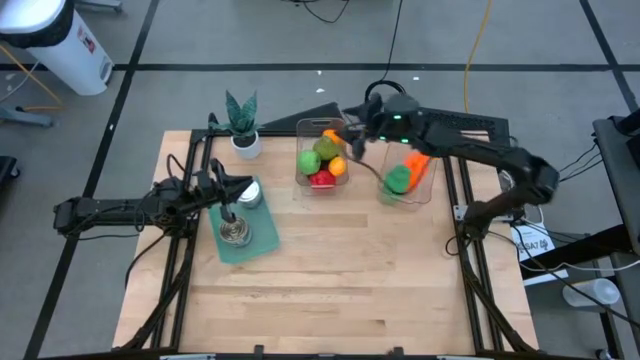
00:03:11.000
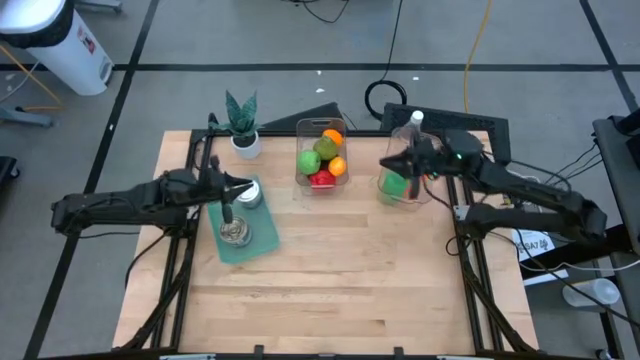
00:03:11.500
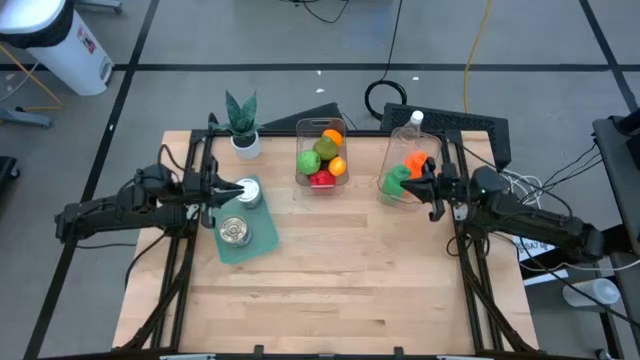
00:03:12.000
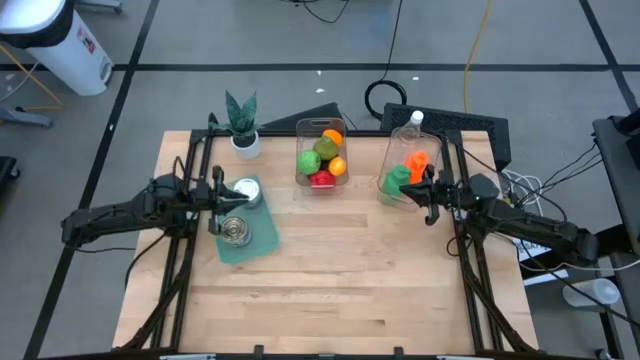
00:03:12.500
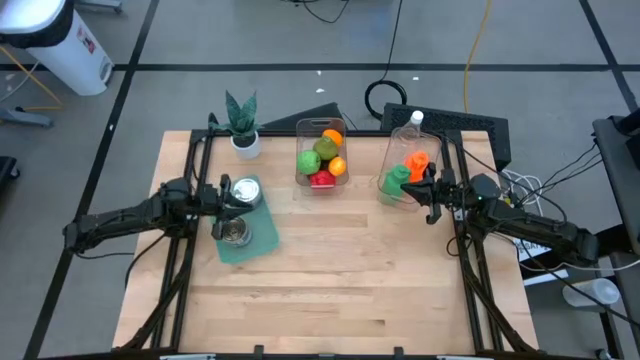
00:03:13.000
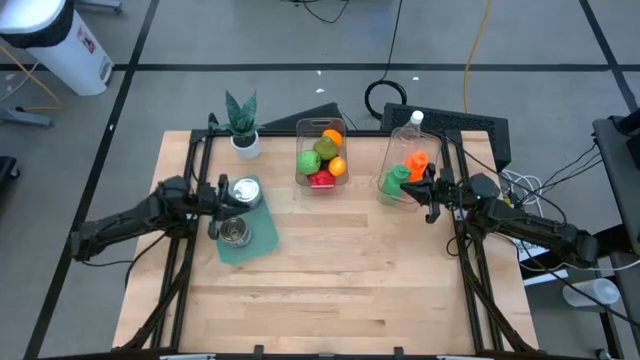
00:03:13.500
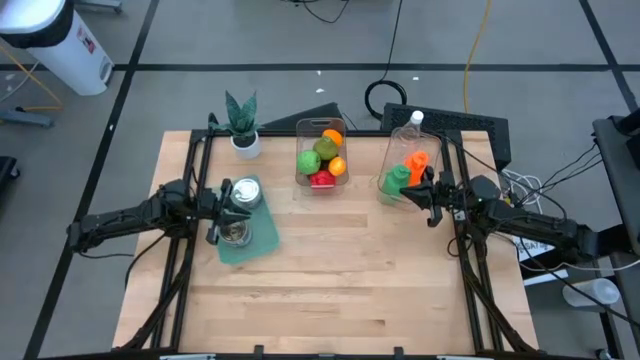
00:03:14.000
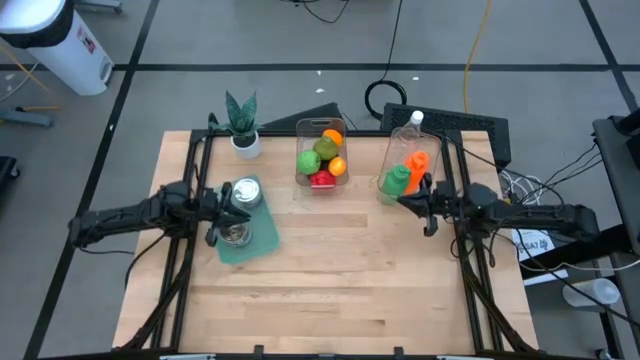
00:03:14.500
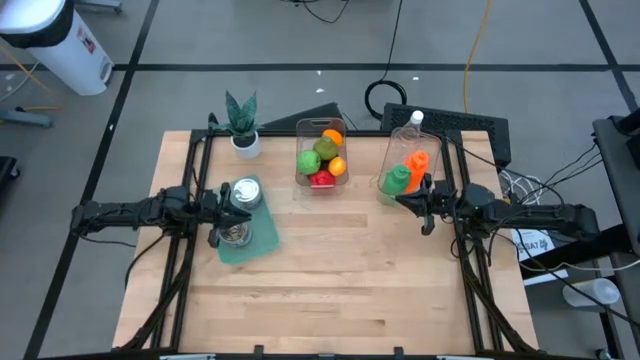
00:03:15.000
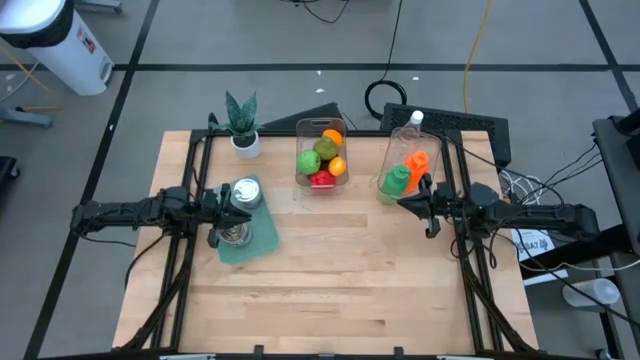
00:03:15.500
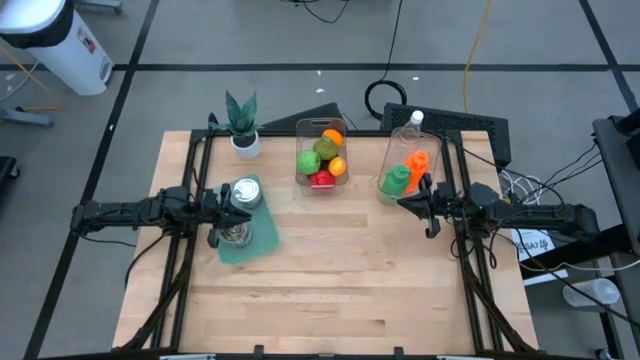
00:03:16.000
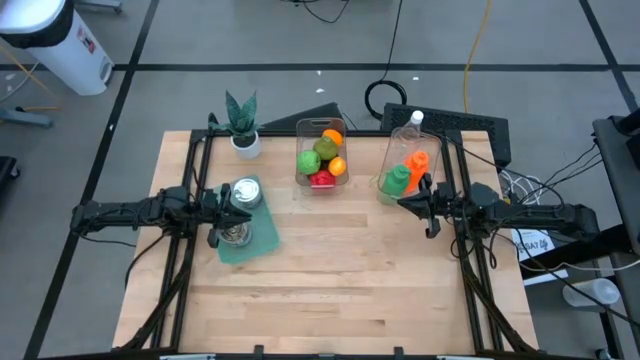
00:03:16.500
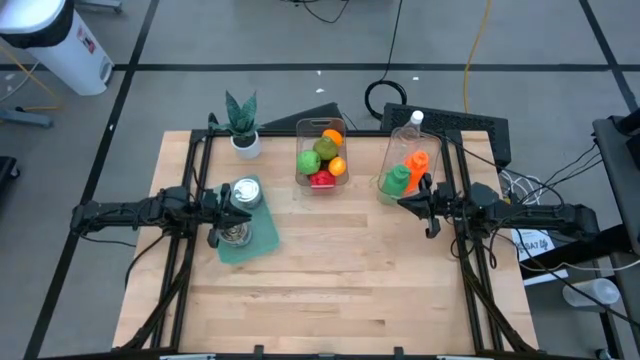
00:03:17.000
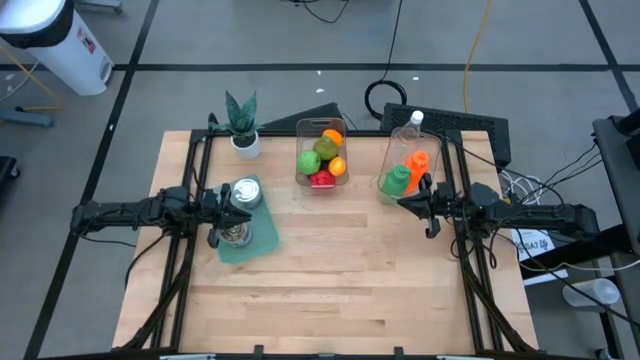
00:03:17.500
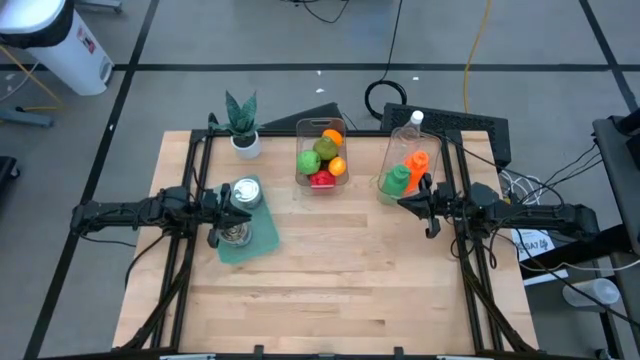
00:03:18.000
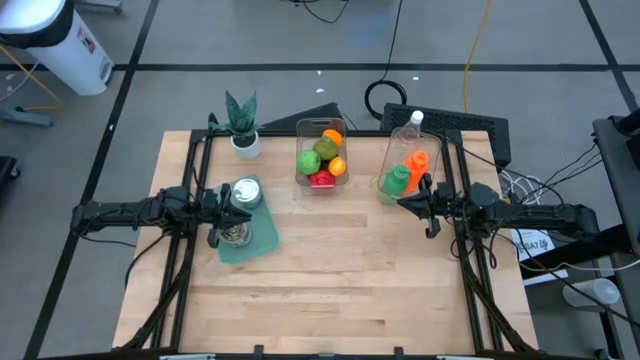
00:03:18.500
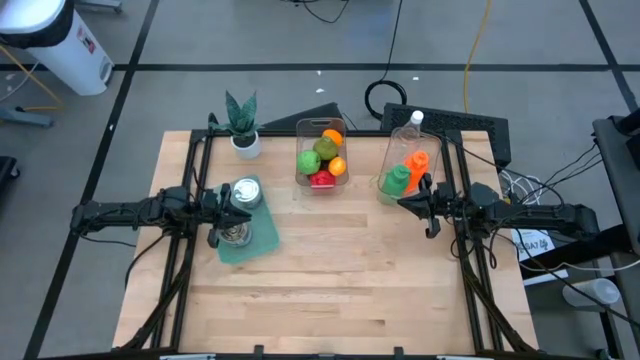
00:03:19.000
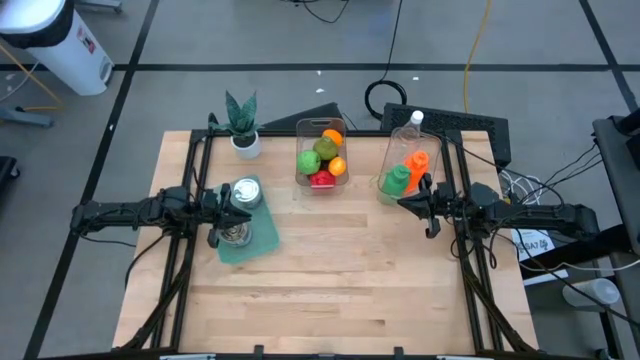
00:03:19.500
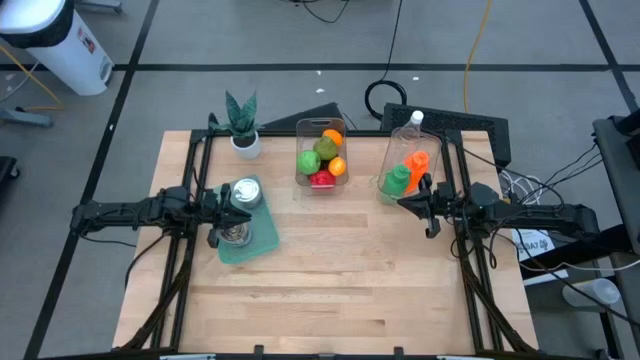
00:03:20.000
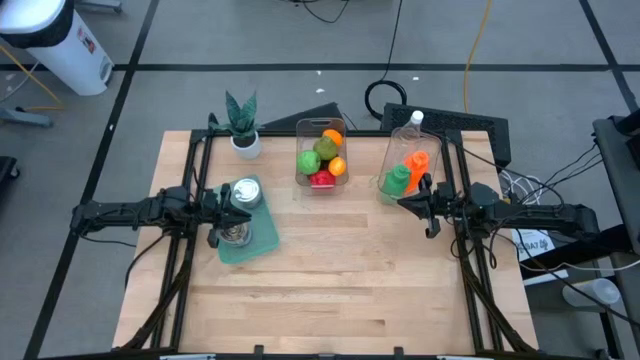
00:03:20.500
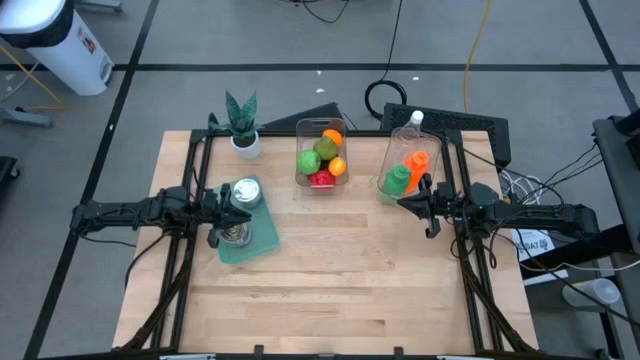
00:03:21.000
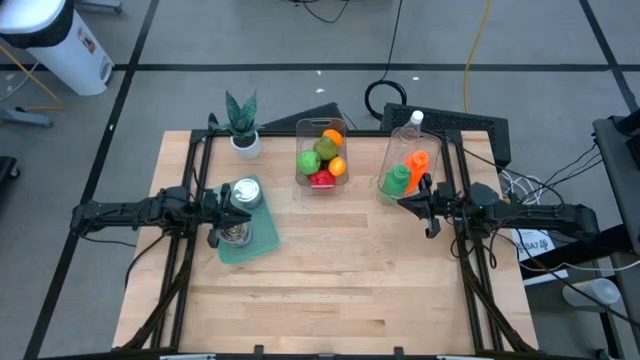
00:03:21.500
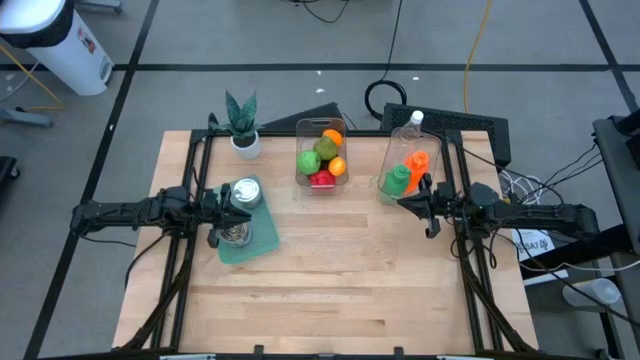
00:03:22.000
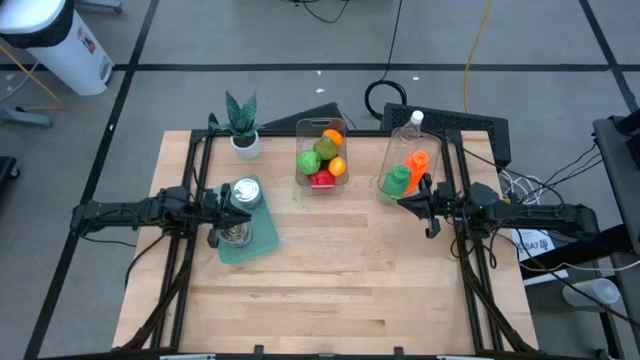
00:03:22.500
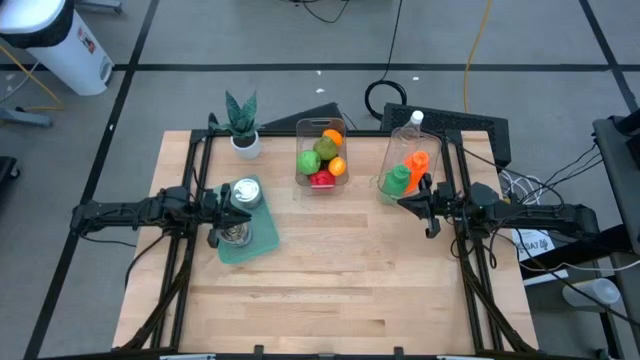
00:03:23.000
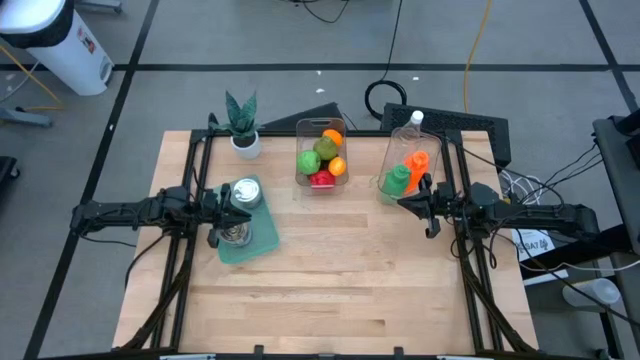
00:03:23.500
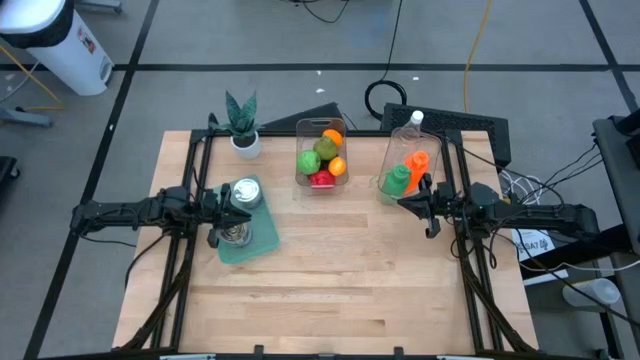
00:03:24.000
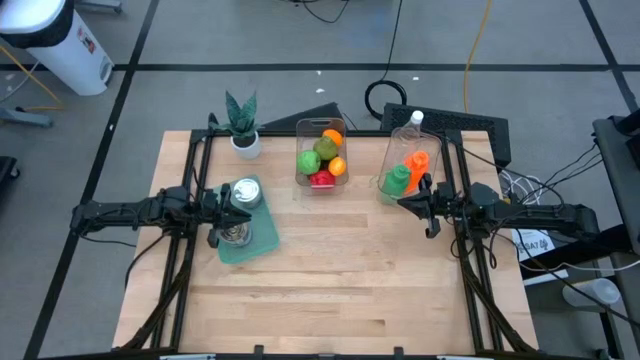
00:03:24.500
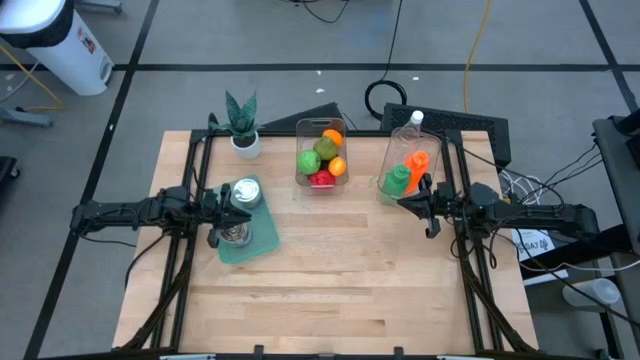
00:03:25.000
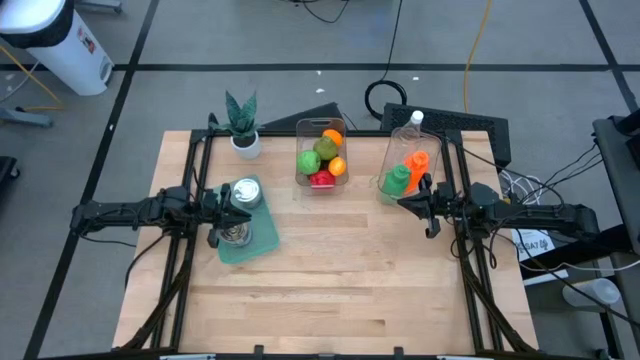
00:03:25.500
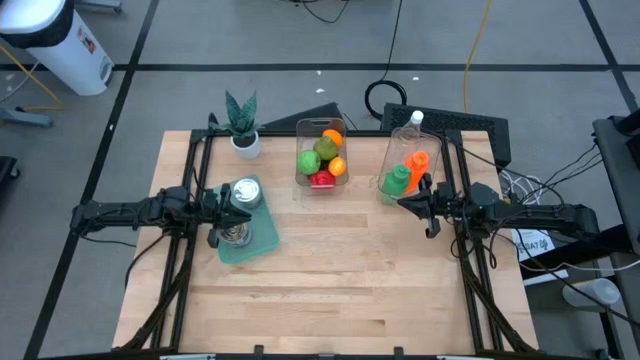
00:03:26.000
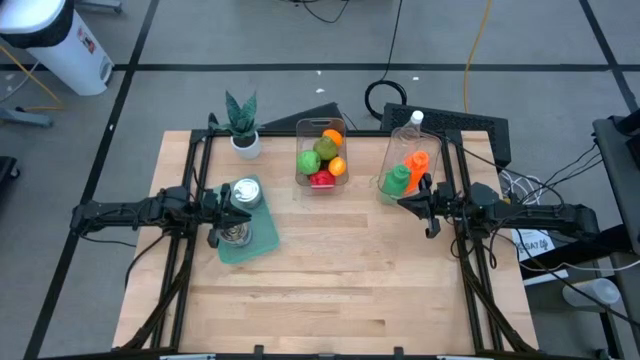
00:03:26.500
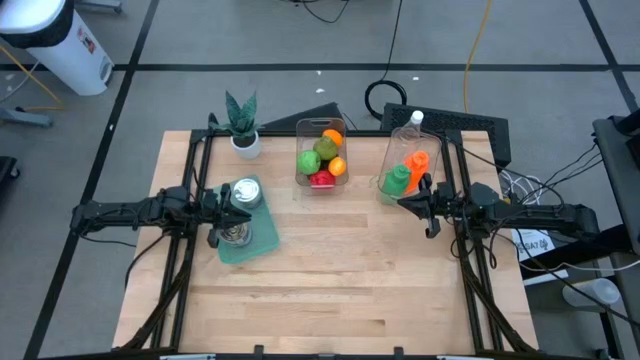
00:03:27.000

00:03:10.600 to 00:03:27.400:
Task: Pick & Place Food Item
Return to home position

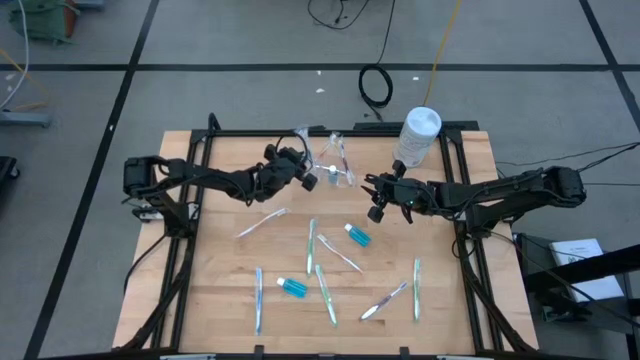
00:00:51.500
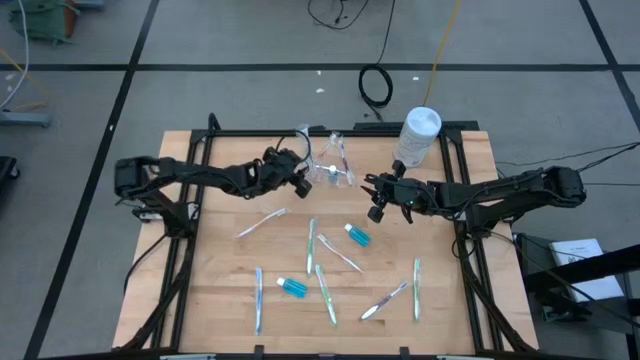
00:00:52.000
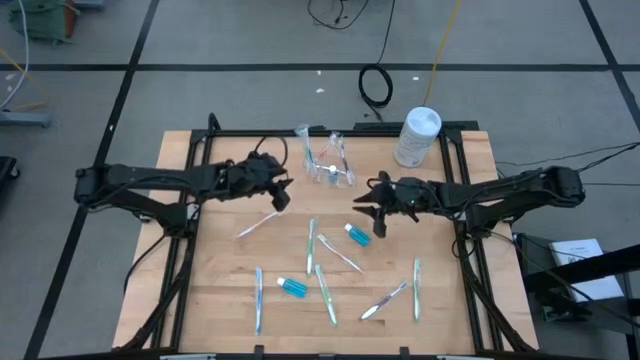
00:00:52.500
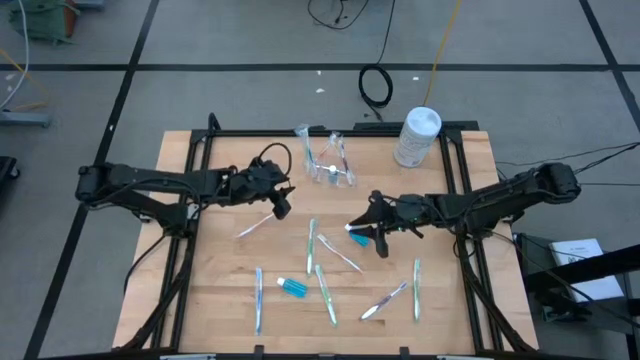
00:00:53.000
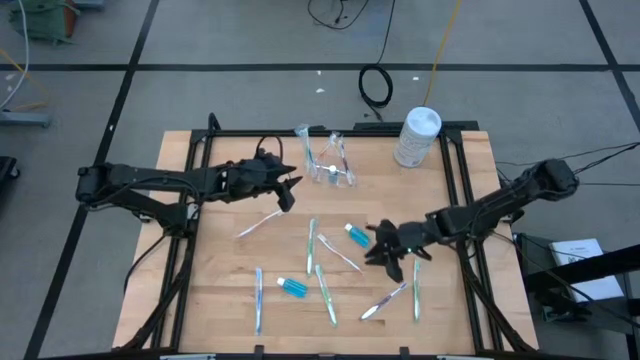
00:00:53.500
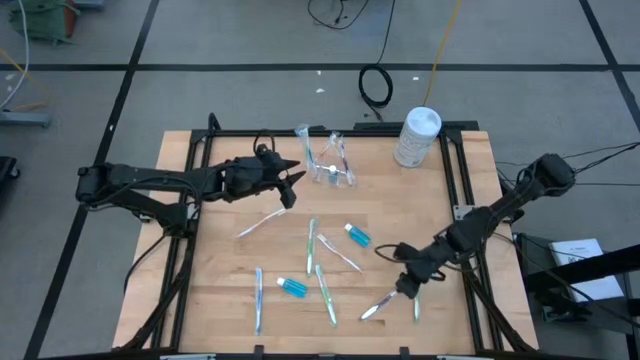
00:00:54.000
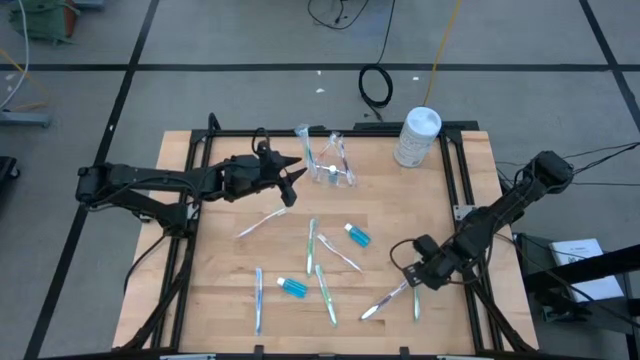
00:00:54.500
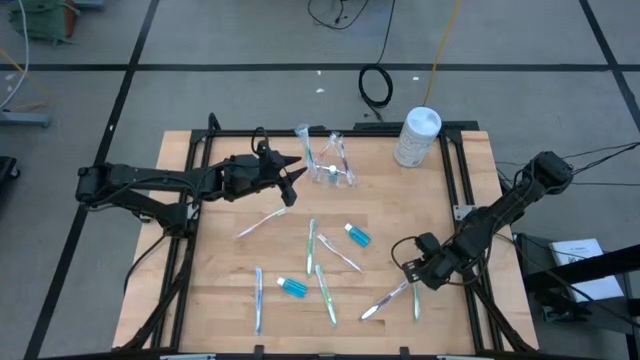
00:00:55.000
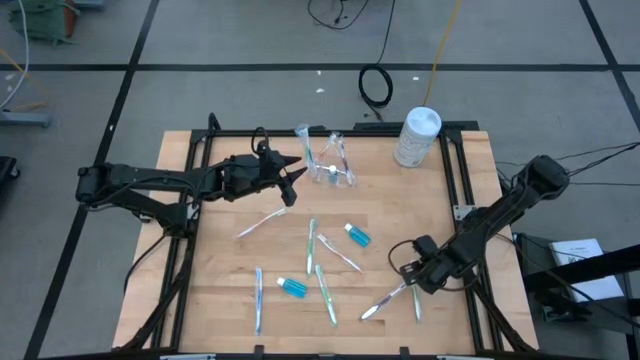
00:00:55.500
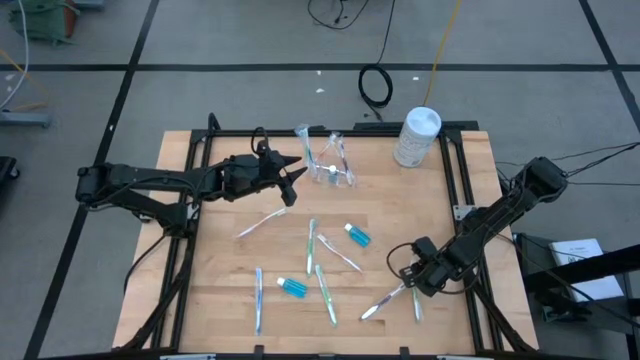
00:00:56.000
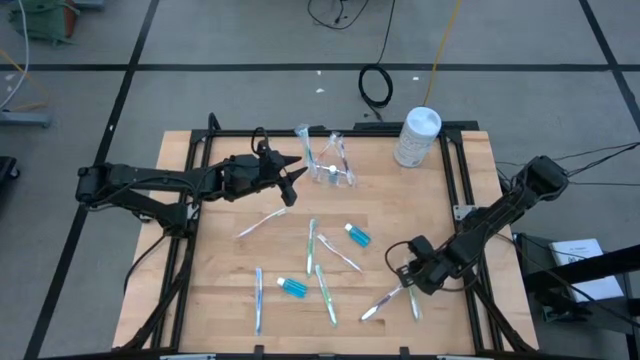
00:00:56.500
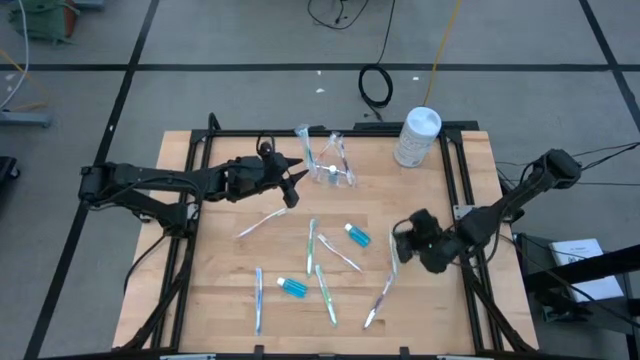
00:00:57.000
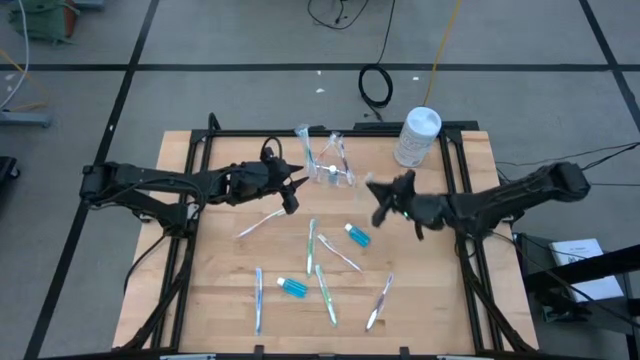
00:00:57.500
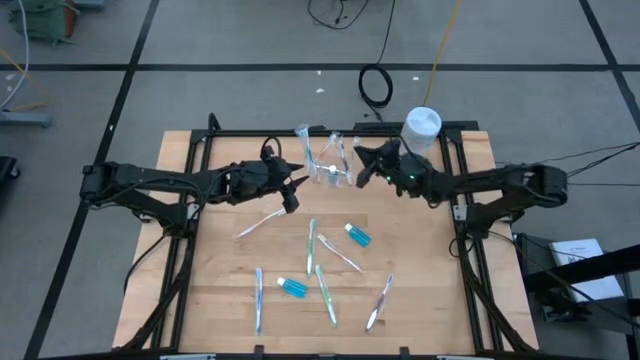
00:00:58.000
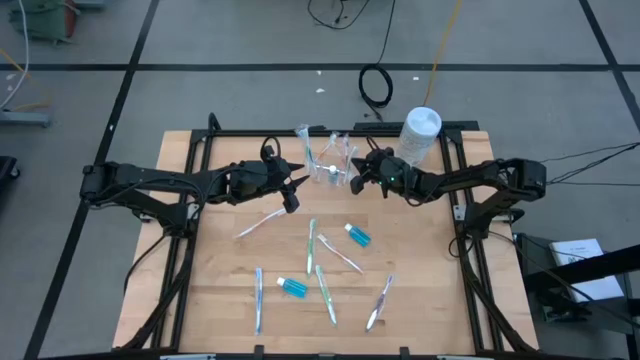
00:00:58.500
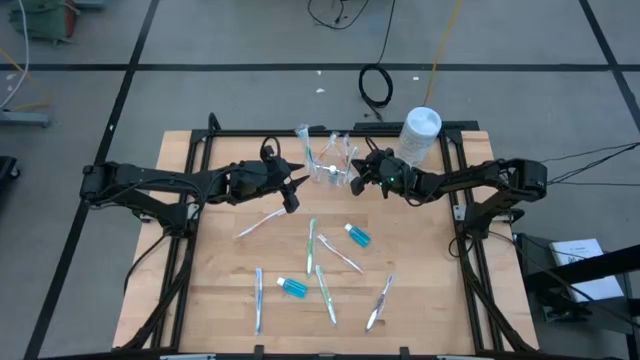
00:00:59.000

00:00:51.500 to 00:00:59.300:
Task: Pick & Place toothbrushing station
Put the green toothbrush into the transparent organizer
